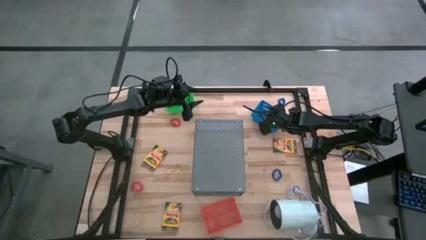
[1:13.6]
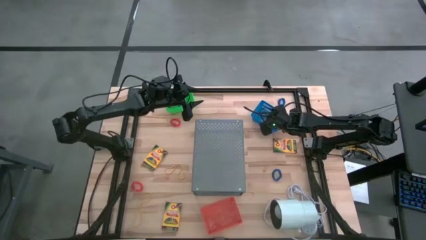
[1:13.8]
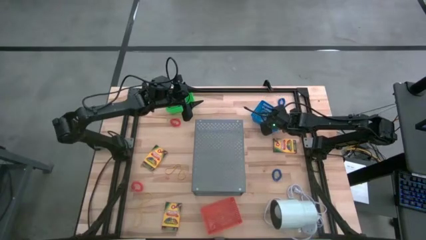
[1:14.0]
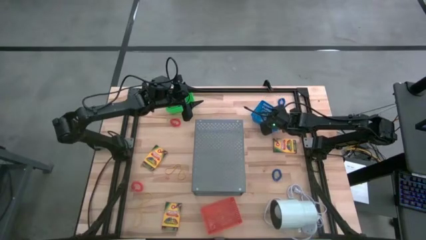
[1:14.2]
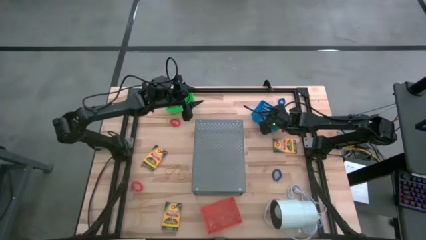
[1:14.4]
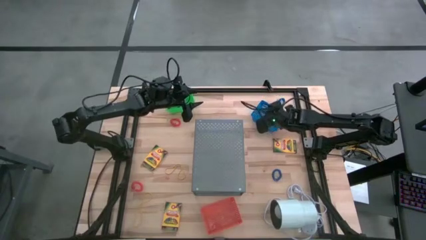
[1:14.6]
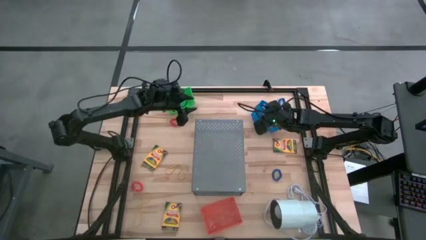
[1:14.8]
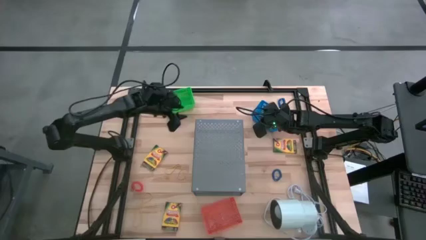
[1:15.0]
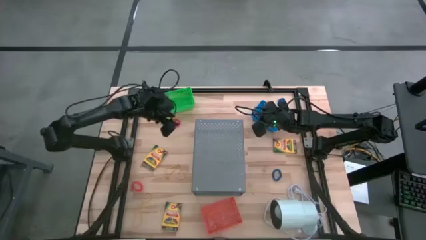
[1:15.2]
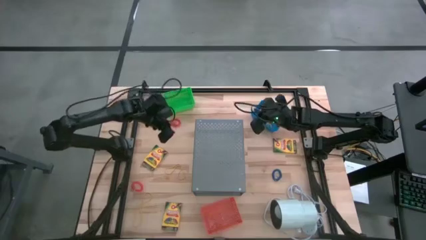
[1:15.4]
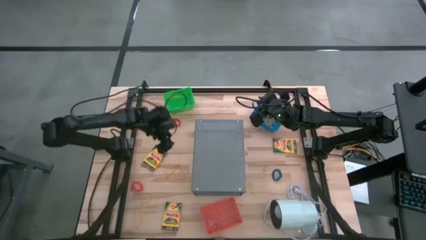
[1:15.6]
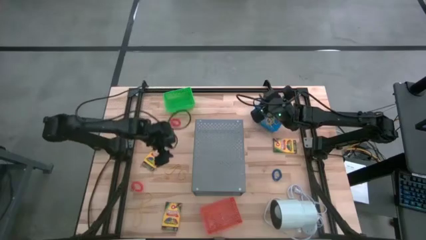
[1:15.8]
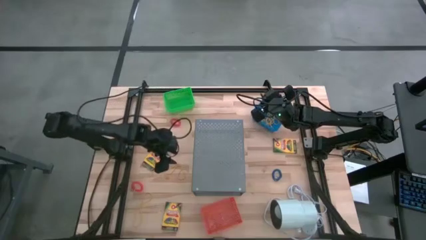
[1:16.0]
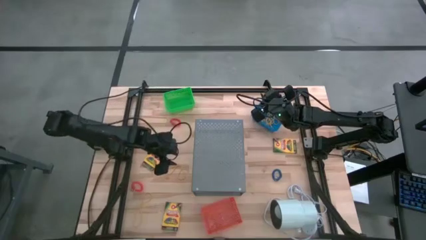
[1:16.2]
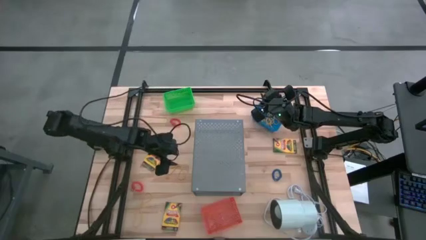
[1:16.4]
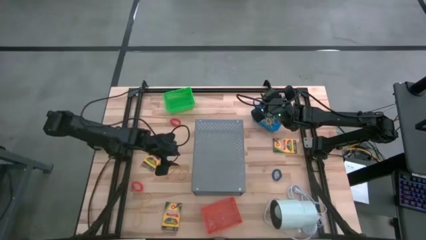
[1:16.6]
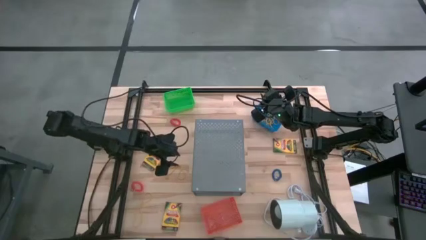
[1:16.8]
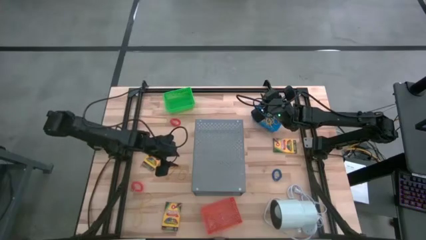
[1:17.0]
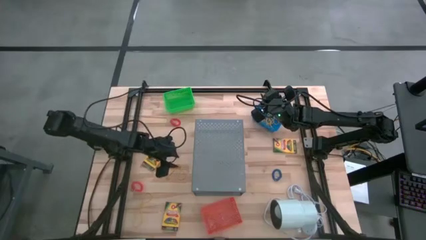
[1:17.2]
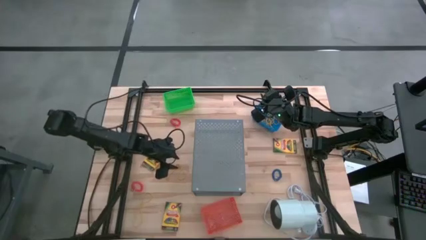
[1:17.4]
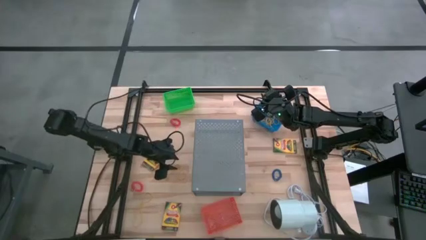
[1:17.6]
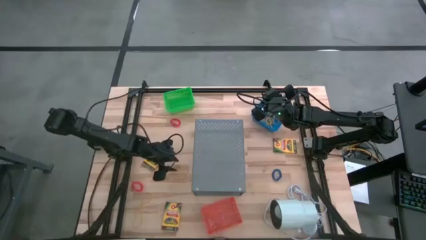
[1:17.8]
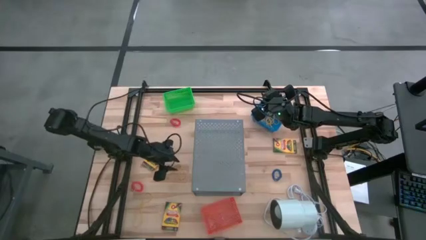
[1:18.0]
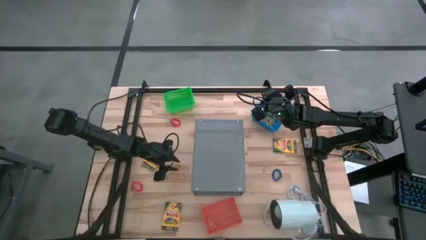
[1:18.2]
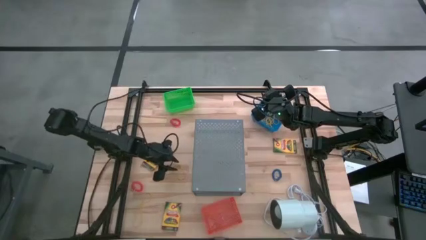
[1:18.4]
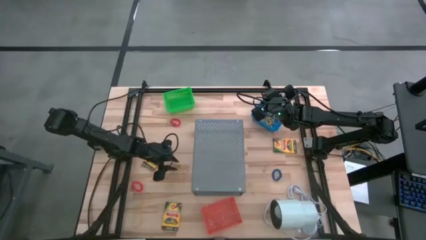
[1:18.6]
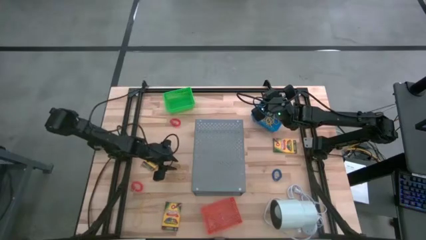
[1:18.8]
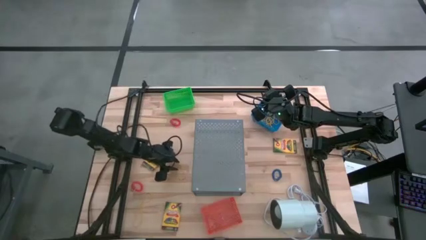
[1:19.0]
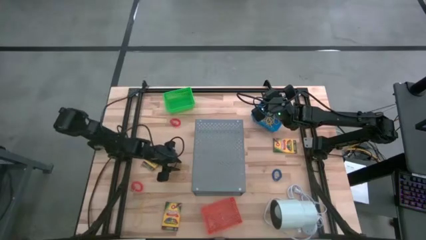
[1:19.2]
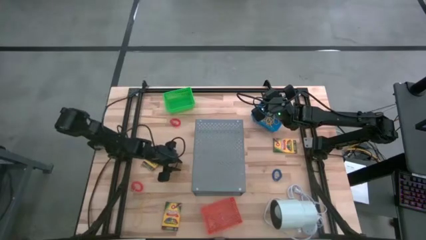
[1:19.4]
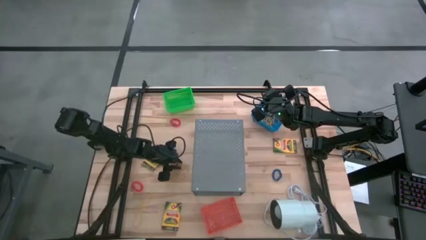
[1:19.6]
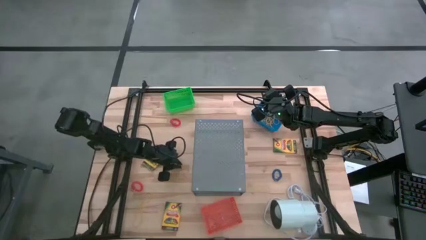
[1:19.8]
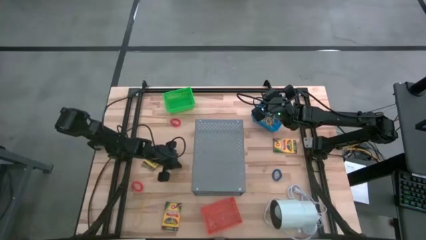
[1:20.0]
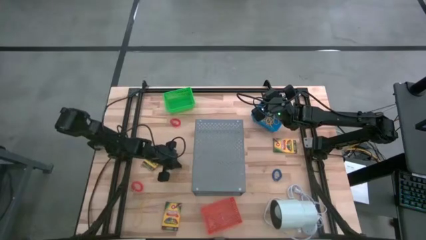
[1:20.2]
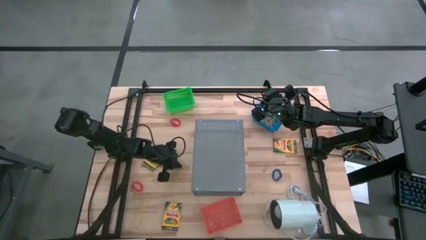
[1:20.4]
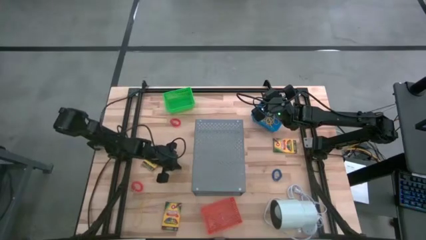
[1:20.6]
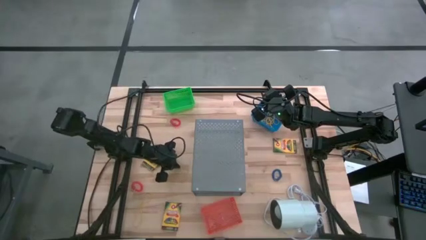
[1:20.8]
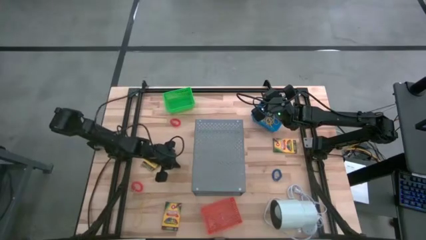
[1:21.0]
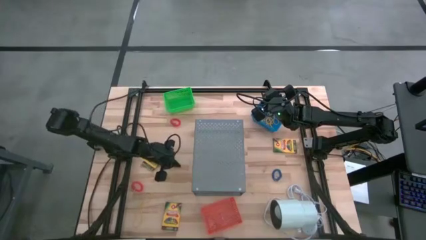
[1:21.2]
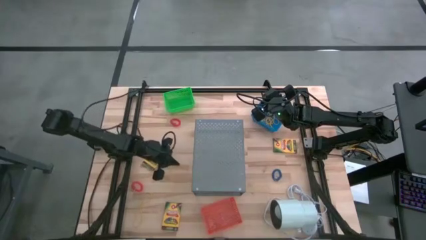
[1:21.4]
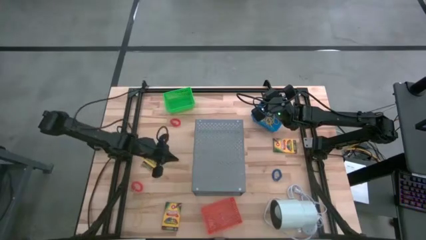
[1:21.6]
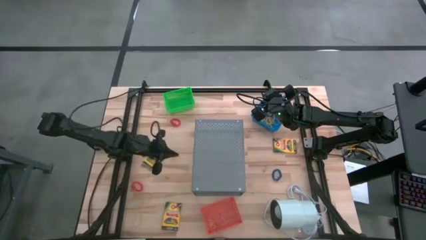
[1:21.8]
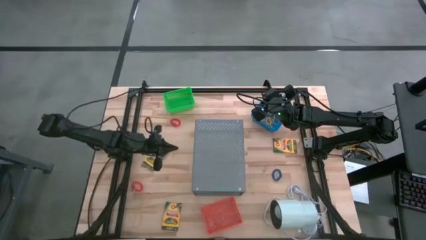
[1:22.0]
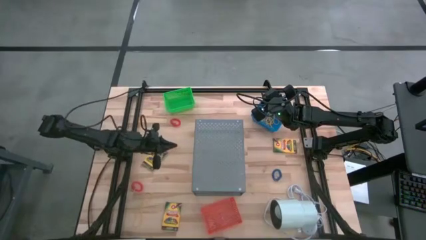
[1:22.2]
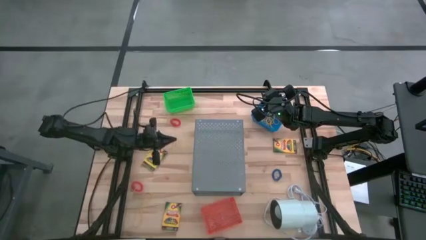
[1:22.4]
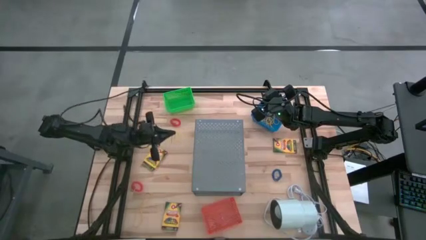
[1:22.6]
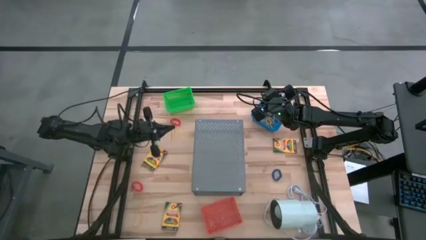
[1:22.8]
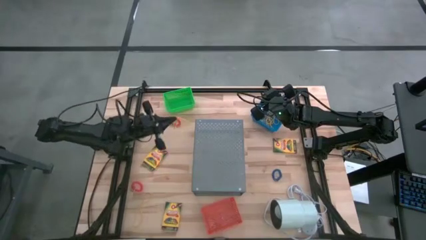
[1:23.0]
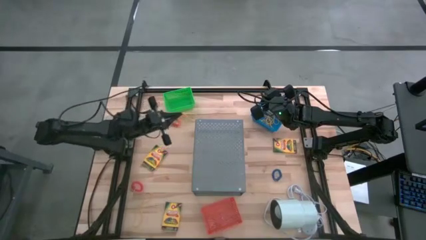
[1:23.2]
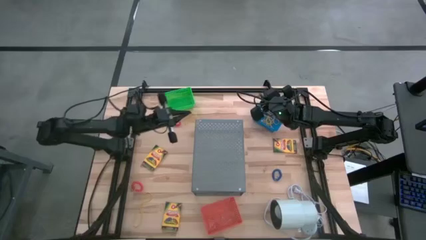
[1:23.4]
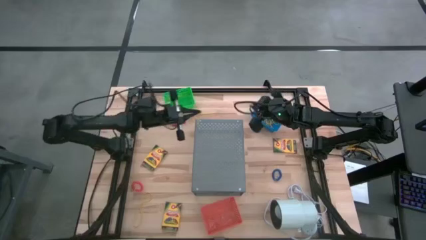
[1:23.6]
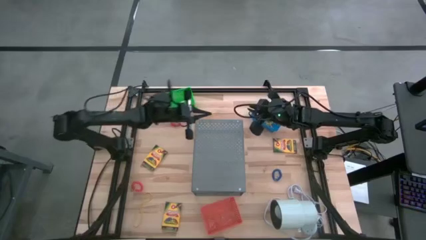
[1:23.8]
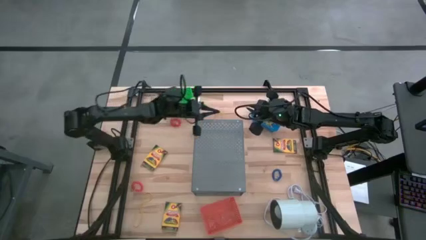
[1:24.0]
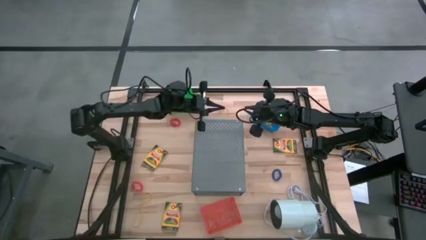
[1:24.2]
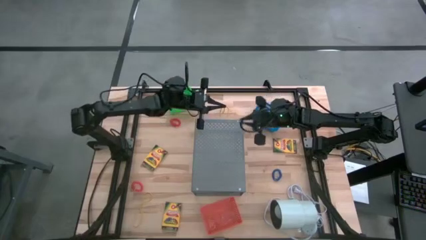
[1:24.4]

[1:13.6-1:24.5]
Task: Pick & Place Office Desk Supplies
Put the top yellow rubber band into the blue basket

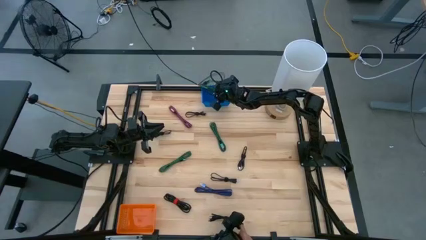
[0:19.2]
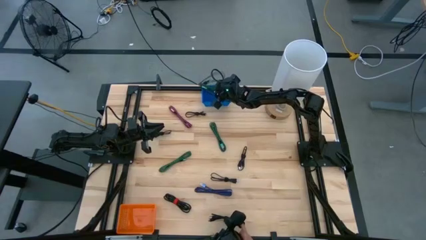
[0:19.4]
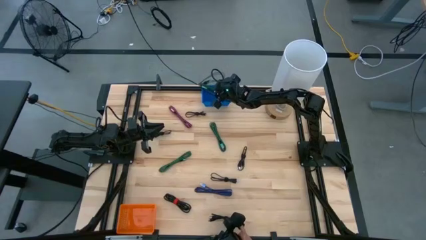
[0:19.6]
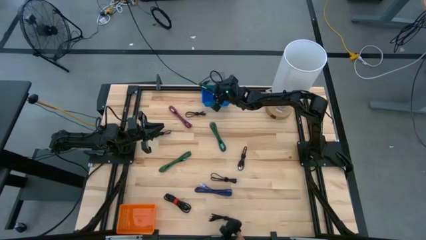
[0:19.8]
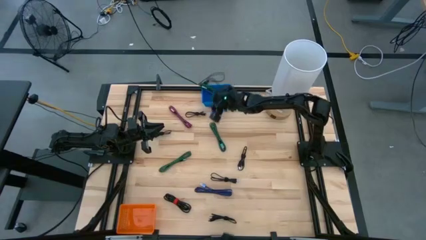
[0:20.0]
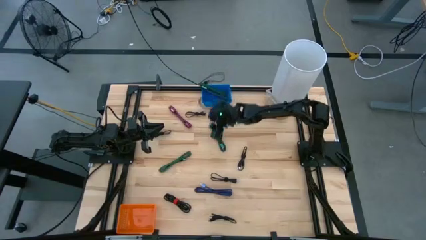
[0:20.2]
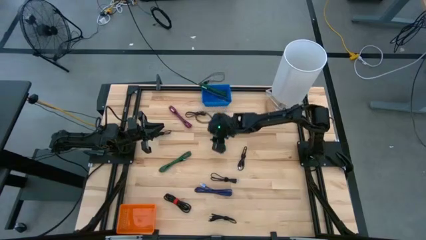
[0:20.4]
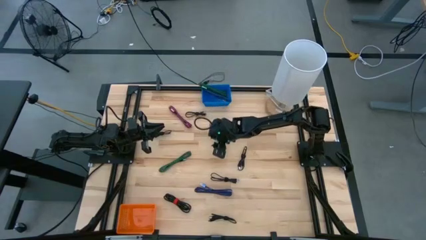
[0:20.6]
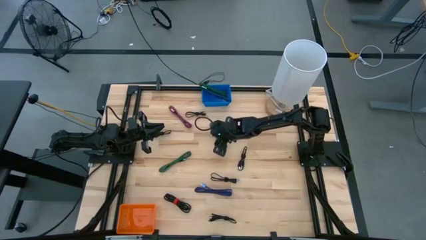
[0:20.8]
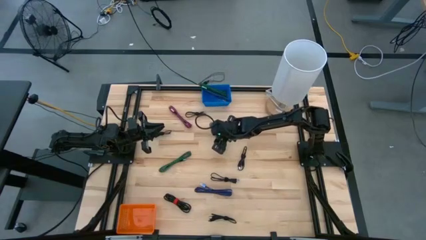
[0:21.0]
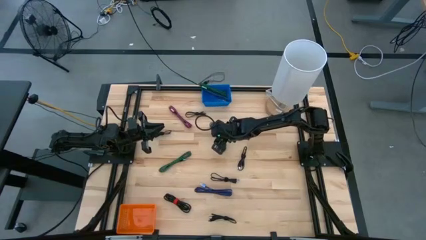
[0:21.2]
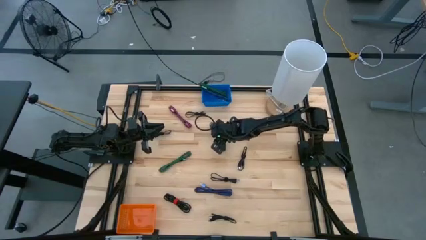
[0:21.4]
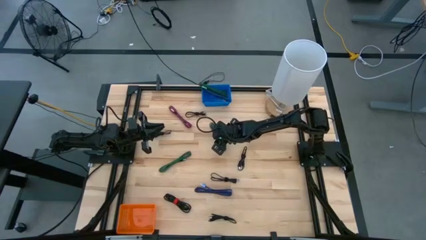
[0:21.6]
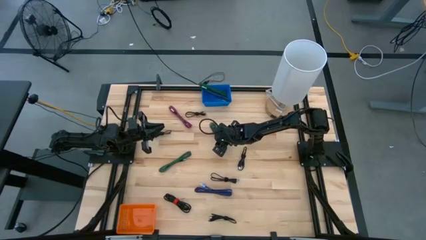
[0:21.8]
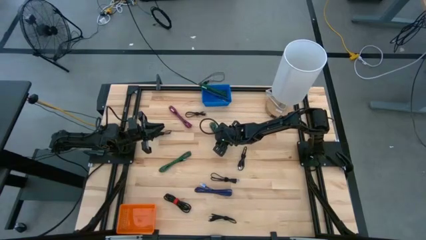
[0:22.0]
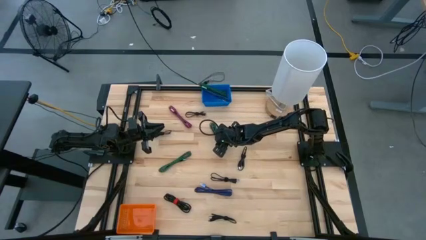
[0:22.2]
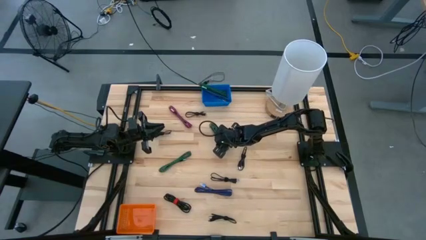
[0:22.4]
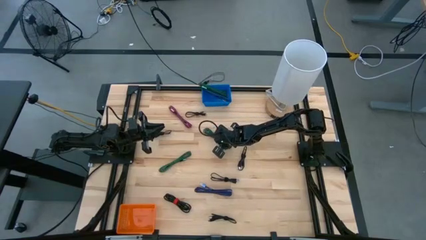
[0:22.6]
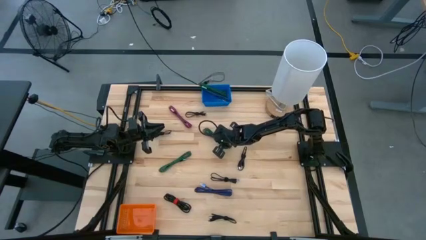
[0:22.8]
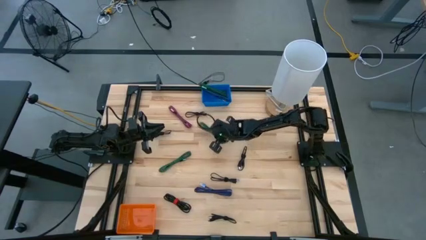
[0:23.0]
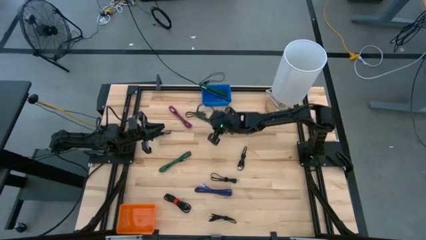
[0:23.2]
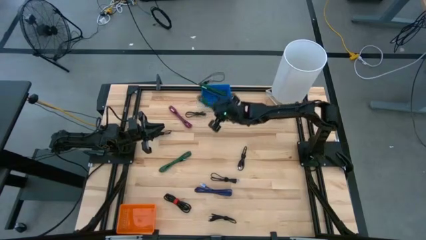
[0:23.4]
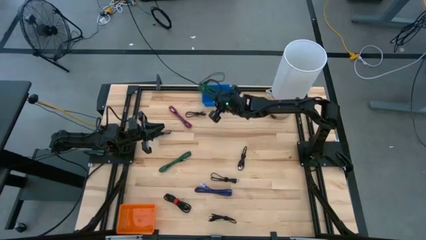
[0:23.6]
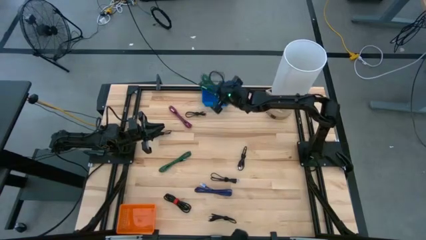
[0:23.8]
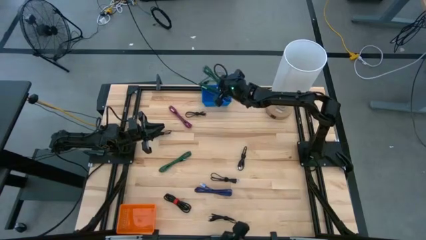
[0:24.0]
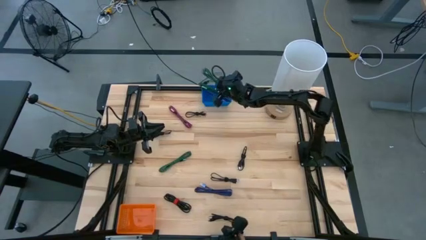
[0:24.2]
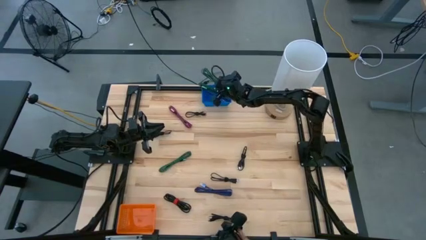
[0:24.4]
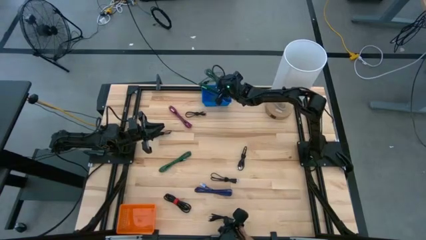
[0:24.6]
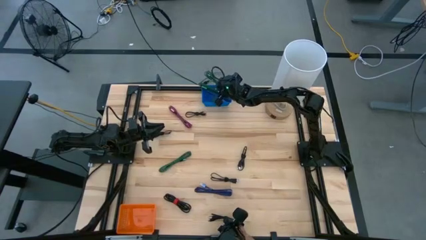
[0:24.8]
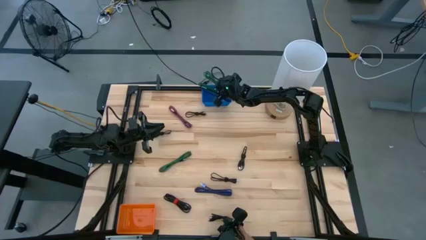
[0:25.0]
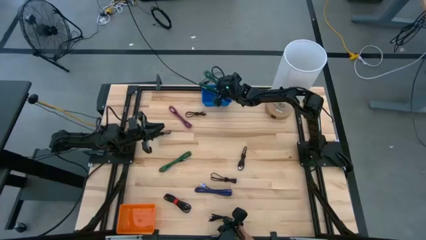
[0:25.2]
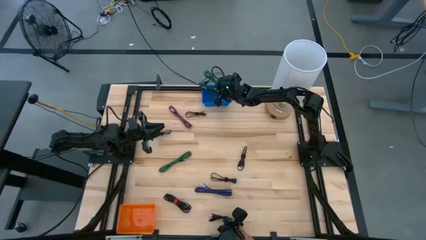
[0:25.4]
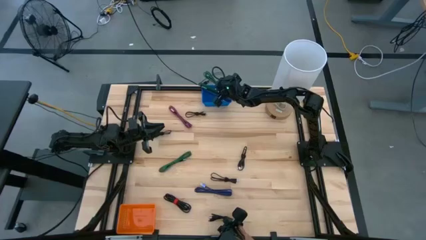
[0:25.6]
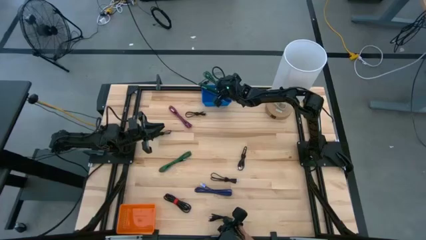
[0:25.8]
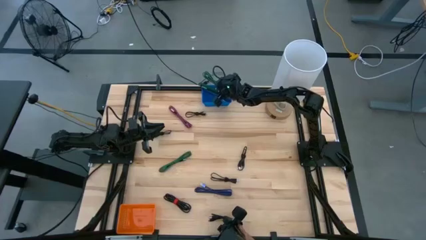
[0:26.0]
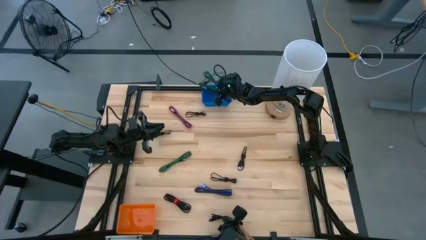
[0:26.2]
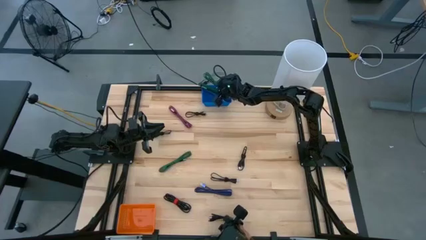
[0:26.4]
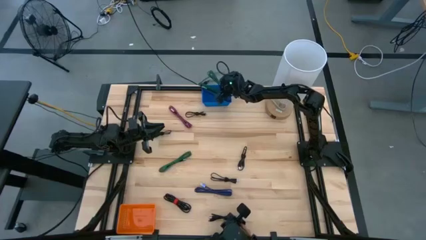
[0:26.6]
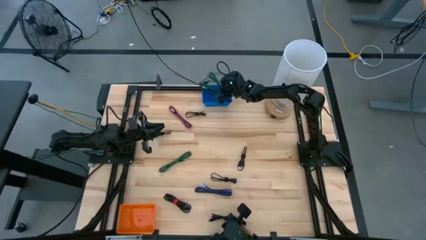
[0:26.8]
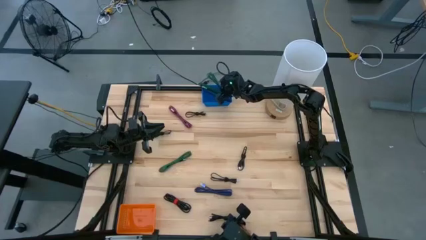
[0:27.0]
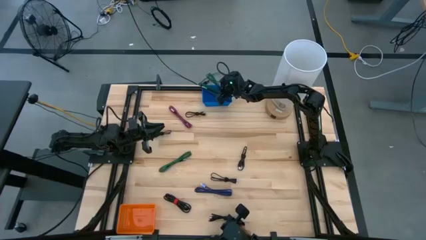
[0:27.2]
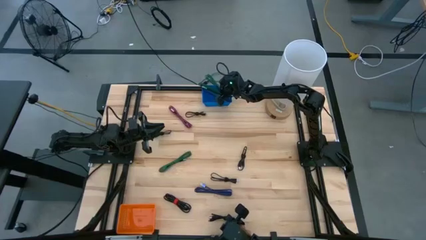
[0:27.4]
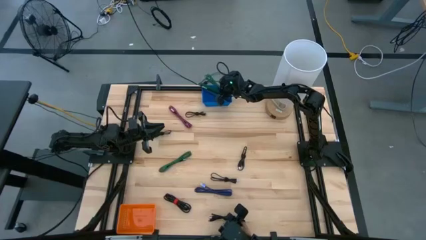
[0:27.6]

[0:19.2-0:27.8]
Task: Pick & Place USB Port
Put the green charger cable into the blue basket
